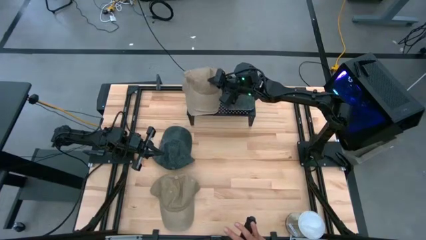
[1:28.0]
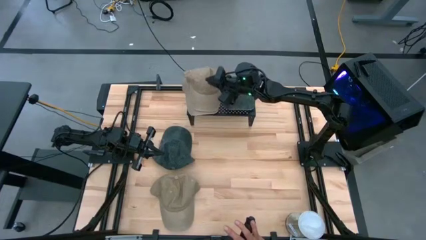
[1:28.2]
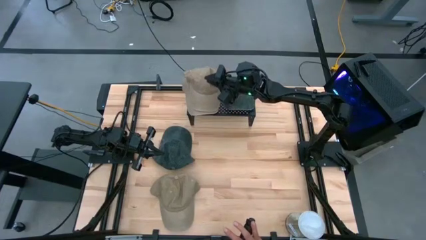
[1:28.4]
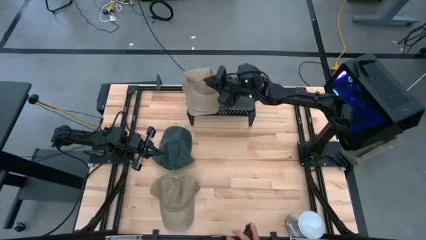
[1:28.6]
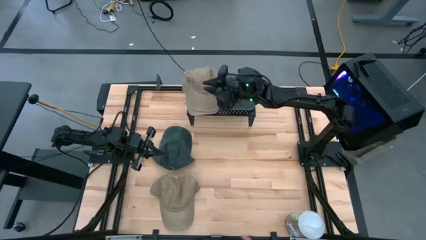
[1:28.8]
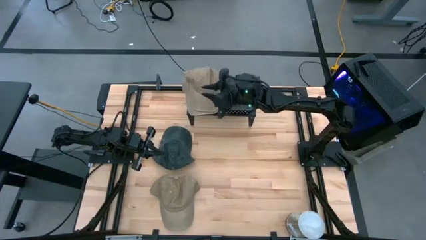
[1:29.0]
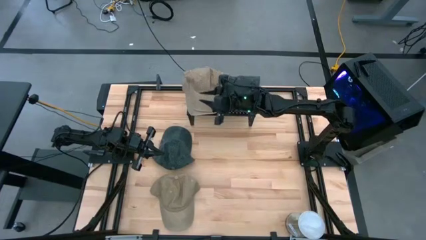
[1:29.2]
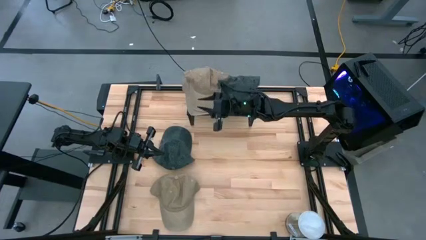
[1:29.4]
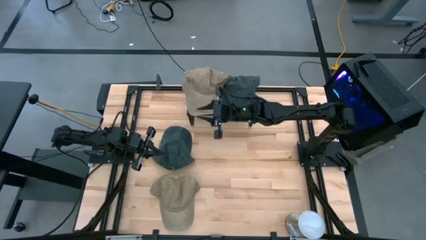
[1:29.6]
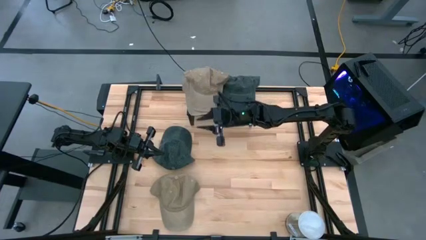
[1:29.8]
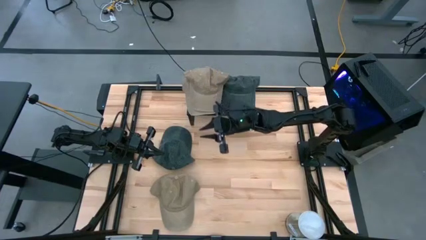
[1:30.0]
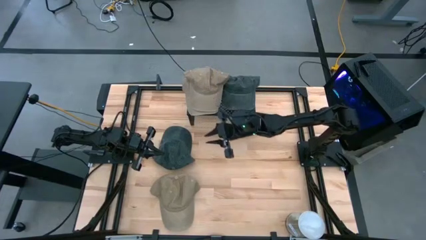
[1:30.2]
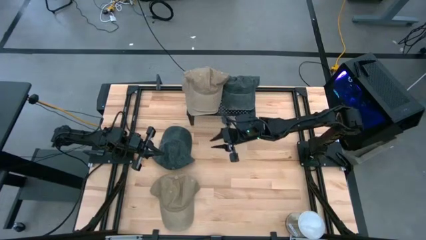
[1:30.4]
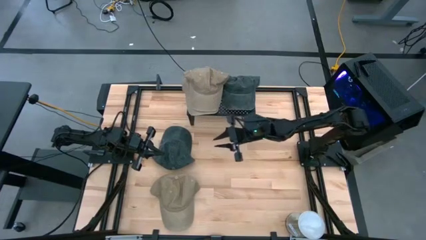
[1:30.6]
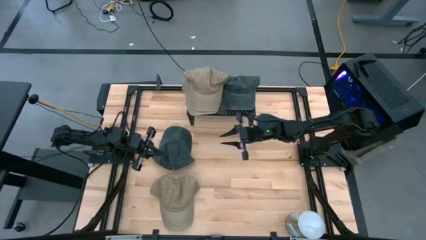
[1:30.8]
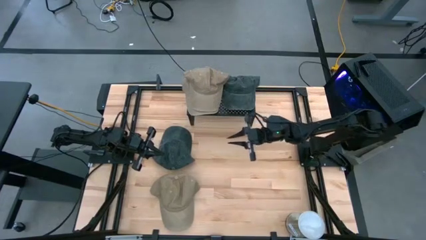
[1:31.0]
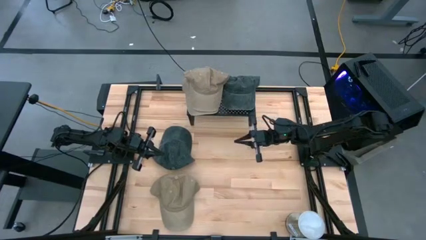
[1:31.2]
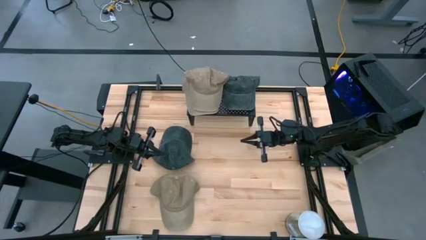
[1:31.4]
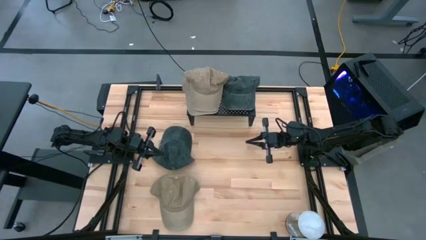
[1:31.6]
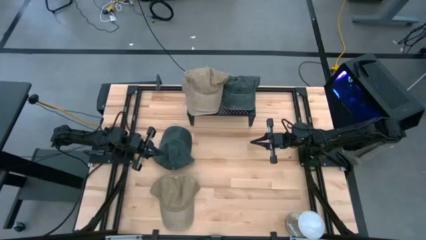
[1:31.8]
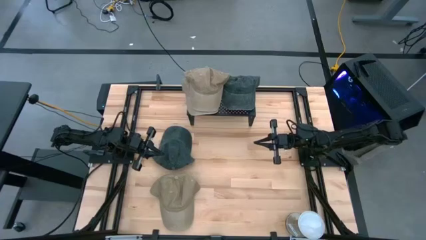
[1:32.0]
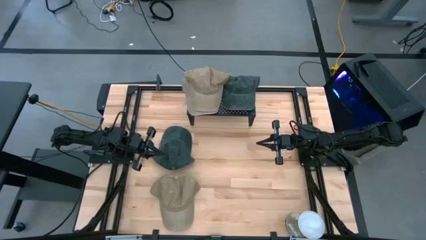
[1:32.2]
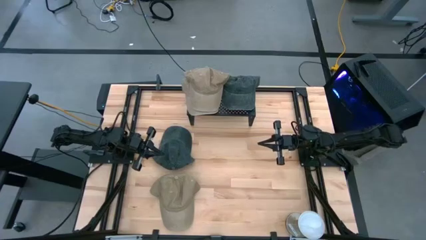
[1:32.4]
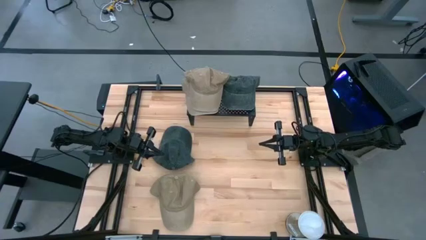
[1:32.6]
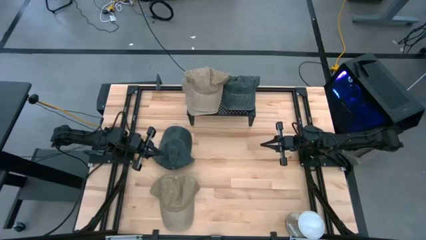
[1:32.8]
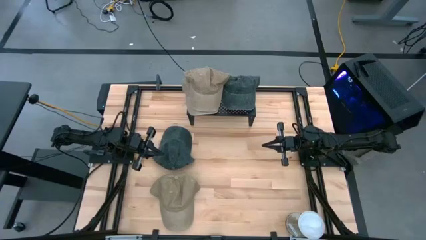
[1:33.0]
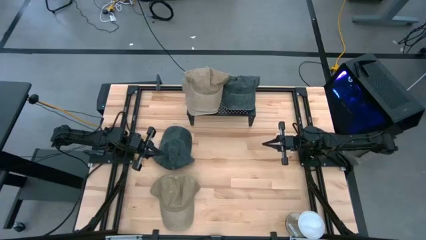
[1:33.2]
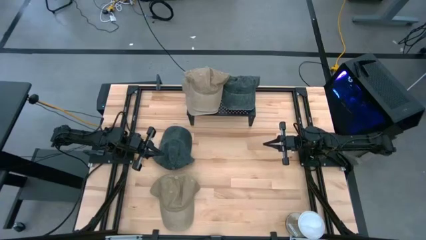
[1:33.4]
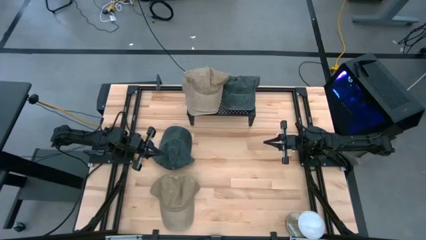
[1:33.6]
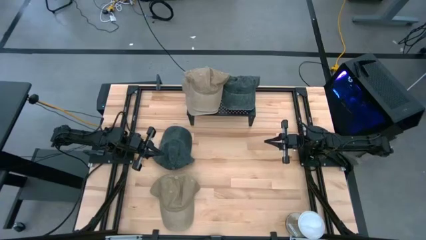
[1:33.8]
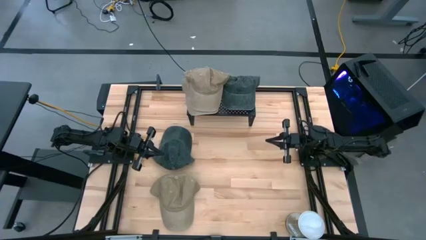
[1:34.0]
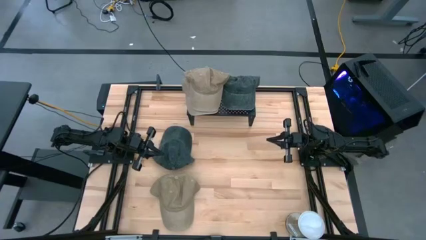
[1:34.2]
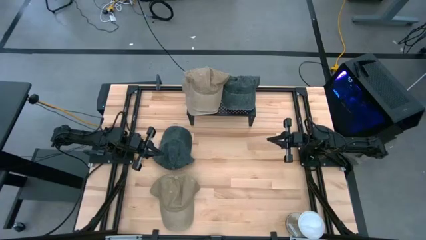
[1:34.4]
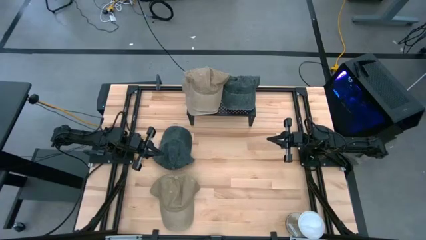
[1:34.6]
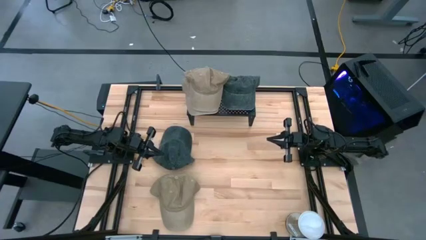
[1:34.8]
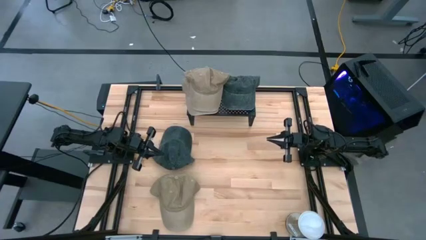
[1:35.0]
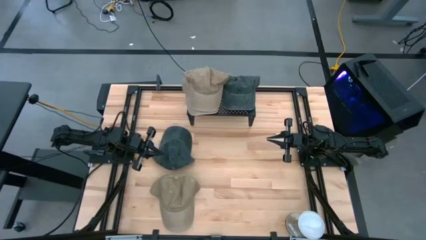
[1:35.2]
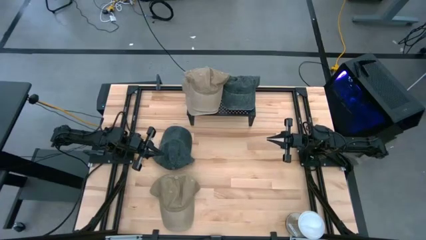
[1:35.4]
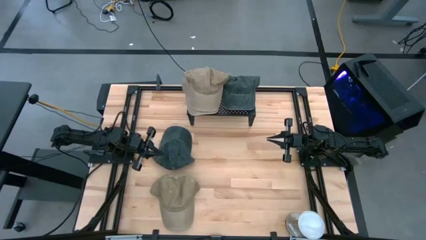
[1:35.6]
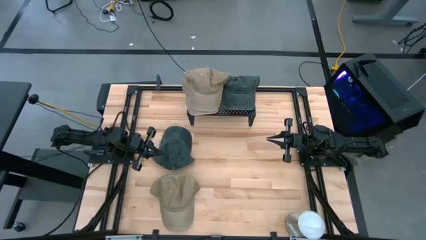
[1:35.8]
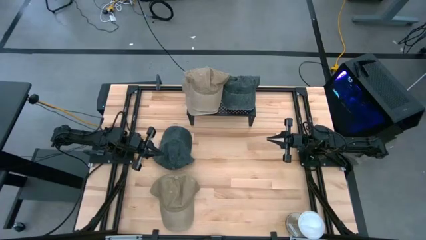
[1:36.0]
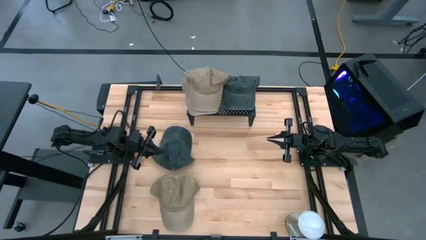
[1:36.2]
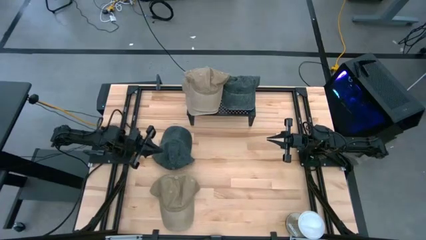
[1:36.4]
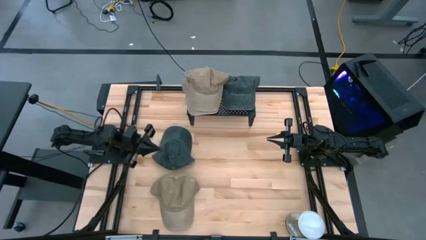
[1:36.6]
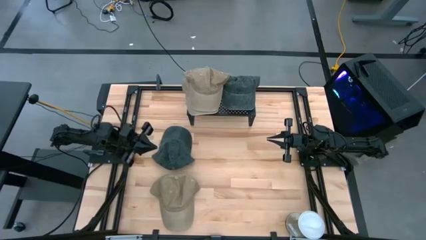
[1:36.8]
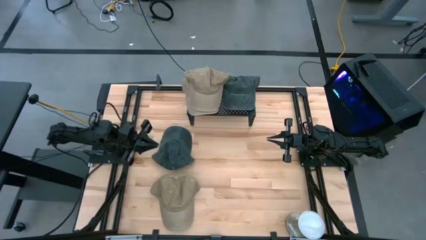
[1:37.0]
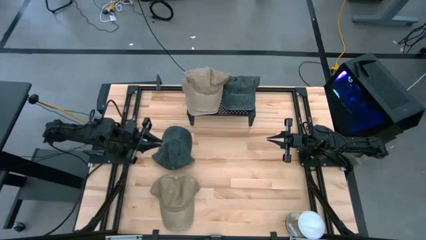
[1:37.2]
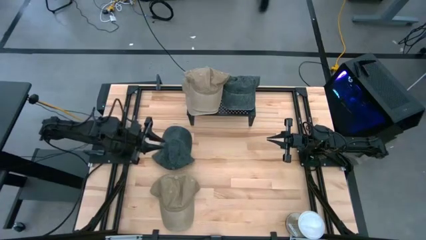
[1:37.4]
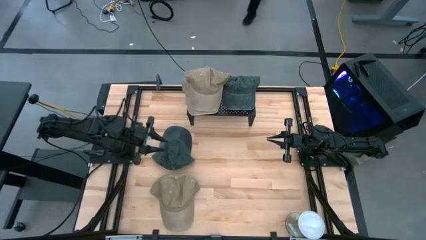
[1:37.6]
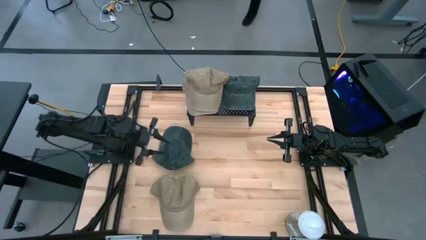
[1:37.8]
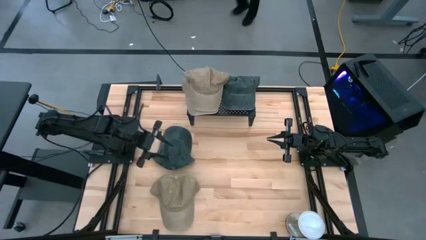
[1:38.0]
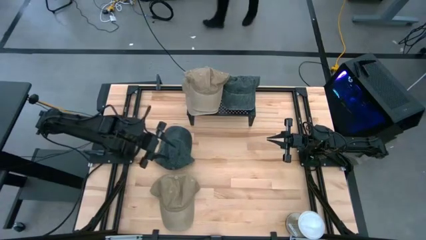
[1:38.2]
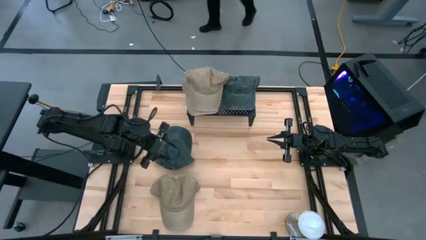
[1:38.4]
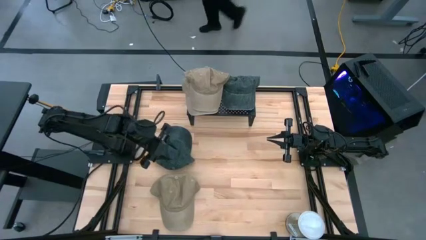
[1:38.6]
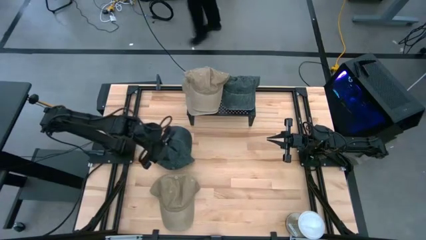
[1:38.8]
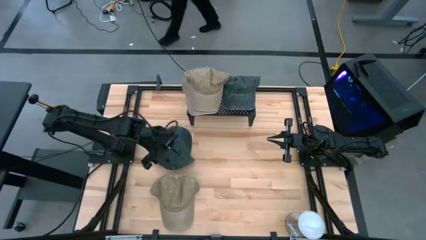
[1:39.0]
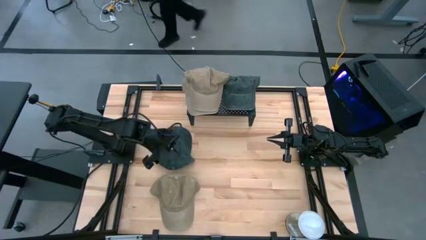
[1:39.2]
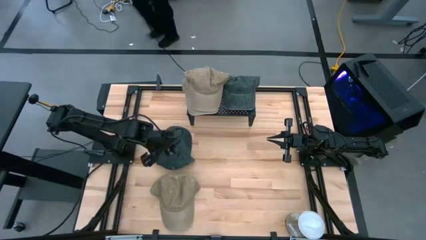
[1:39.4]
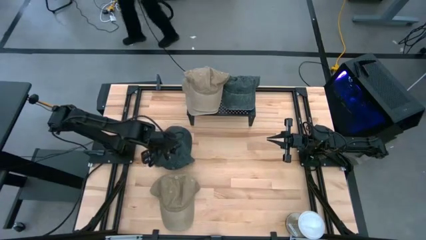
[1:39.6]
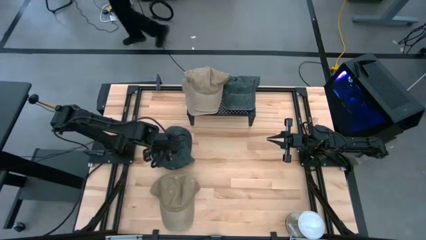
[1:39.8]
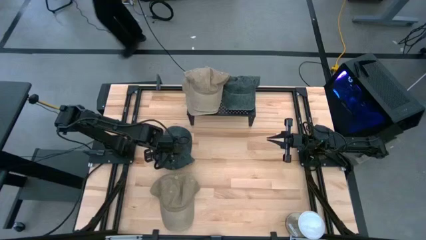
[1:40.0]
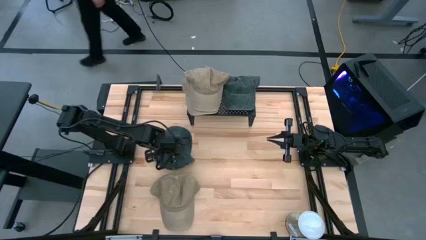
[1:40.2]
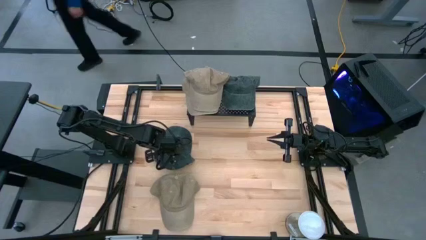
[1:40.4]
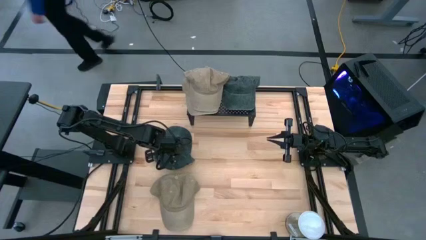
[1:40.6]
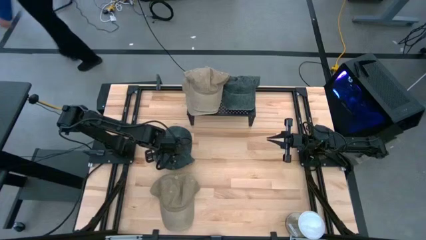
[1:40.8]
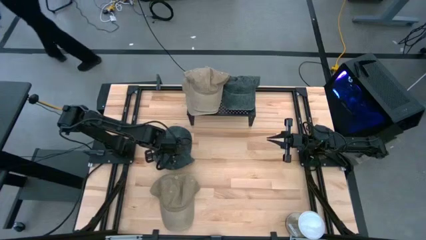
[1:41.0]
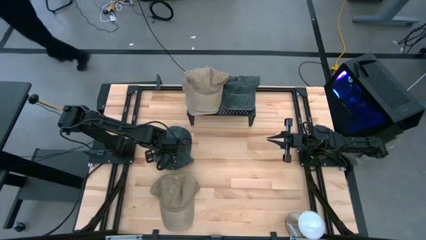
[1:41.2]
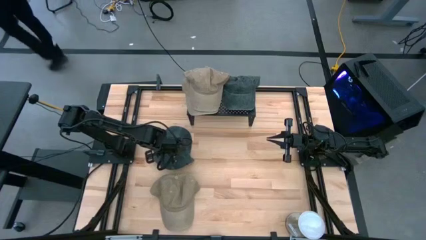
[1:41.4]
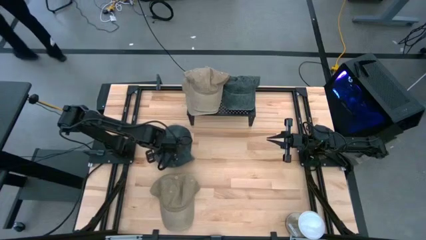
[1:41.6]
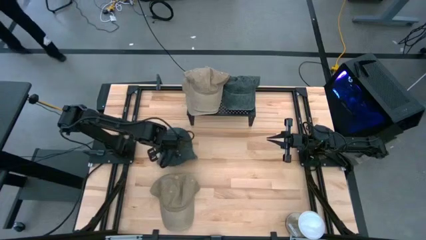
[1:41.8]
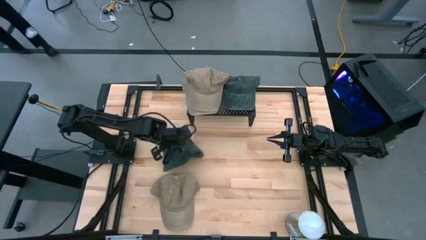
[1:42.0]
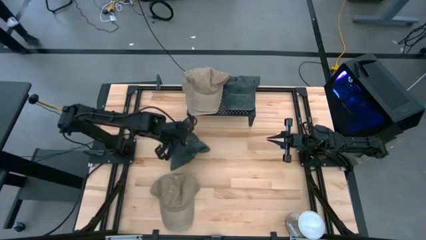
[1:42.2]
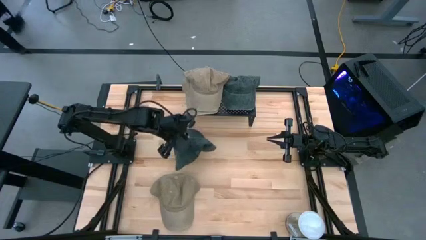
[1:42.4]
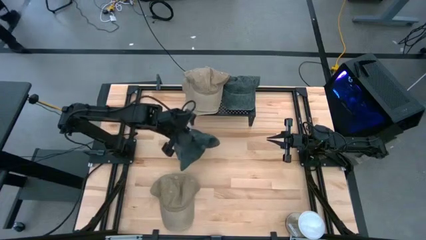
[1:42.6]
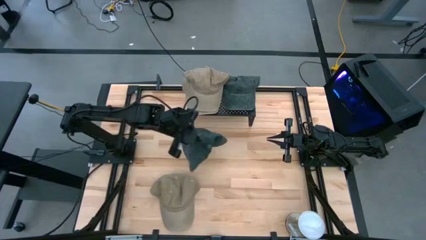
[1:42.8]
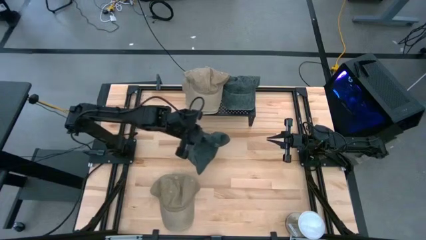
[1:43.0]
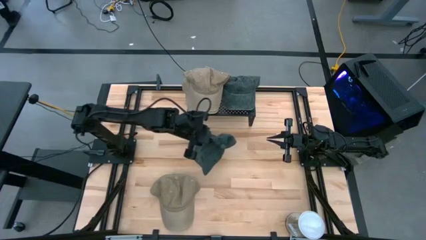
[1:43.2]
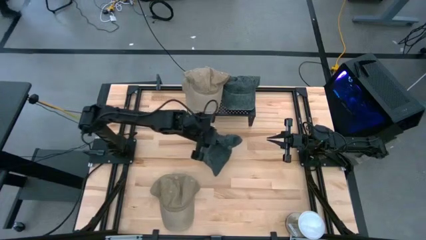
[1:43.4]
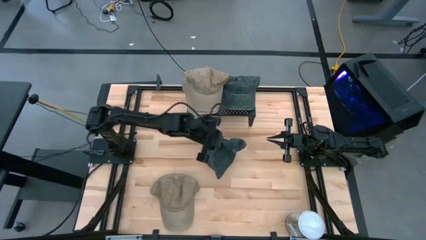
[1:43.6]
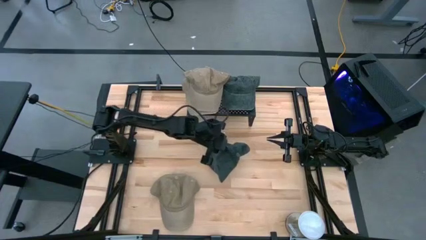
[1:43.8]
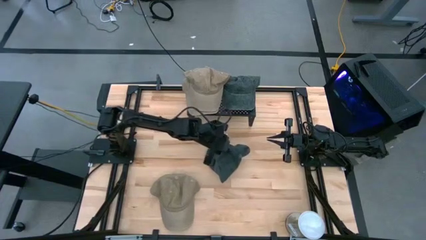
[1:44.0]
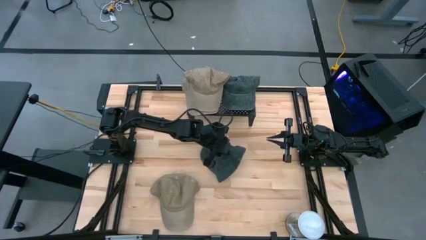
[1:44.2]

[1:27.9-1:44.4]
Task: Pick & Place hat
Move the black cap to the center of the table
